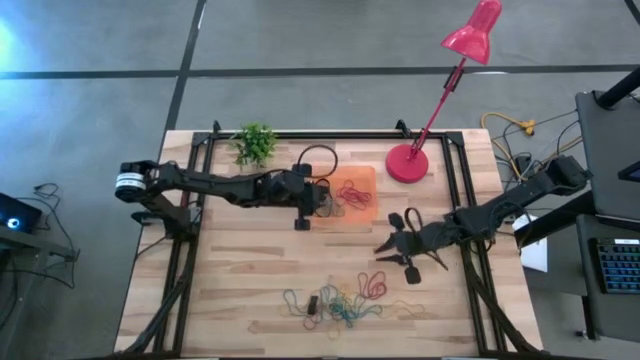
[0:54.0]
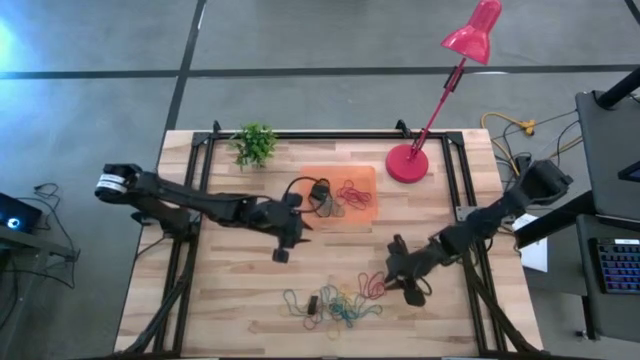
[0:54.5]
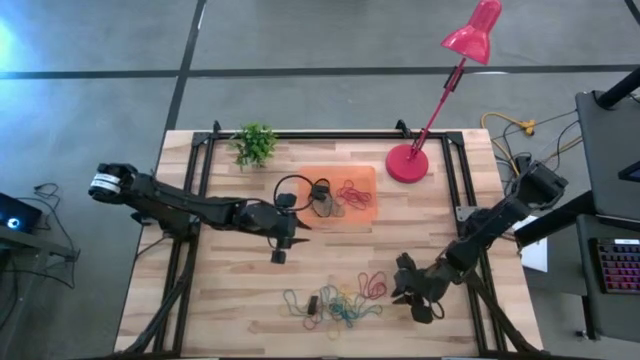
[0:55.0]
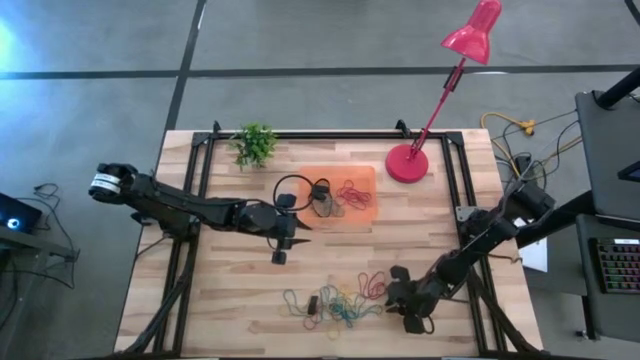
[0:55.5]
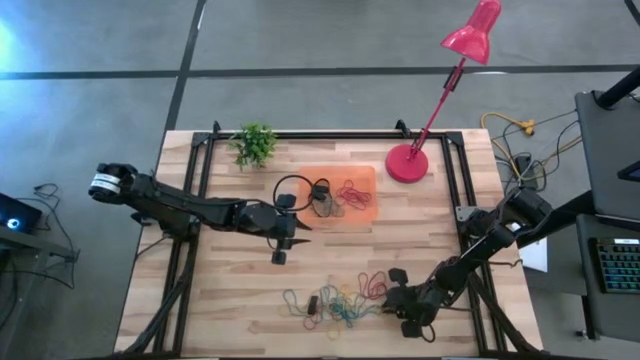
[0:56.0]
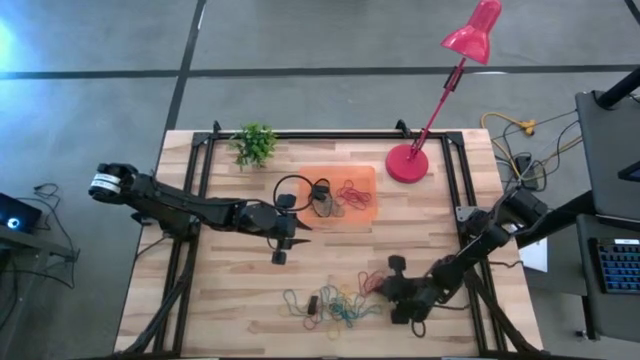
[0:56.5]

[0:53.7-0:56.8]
Task: Pick and place rubber bands into bin
Put the right red rubber band into the bin

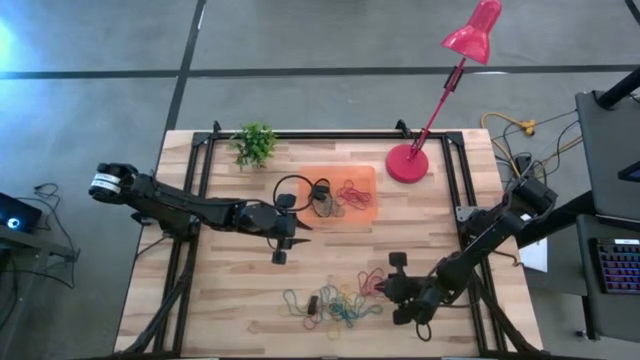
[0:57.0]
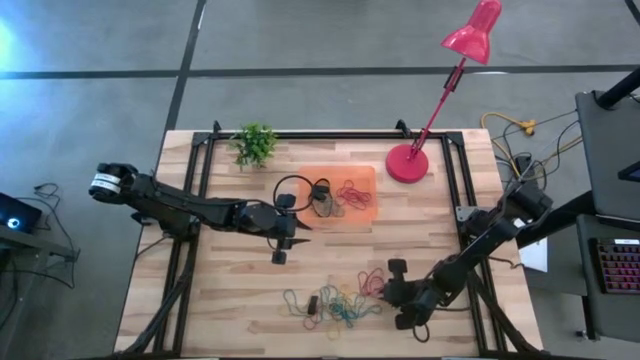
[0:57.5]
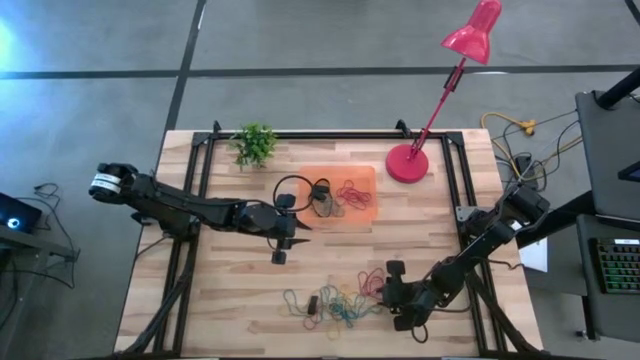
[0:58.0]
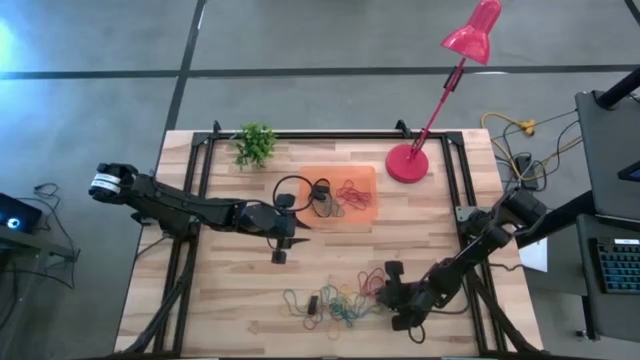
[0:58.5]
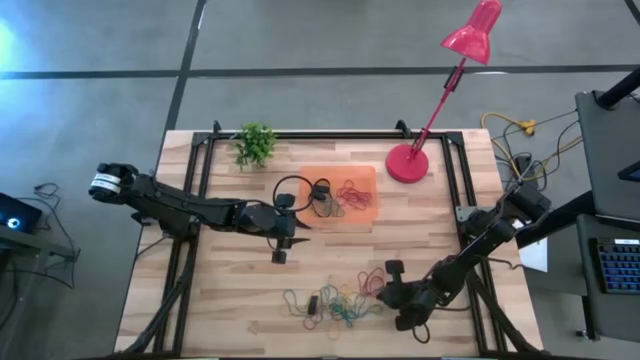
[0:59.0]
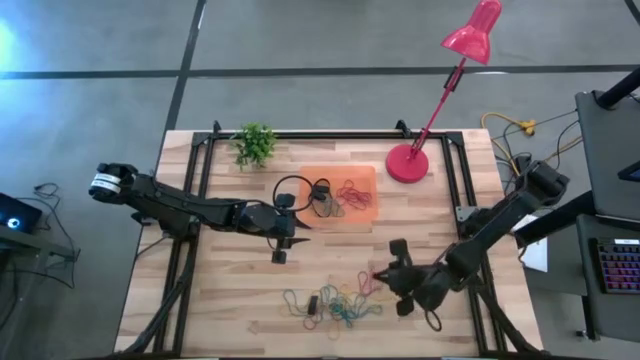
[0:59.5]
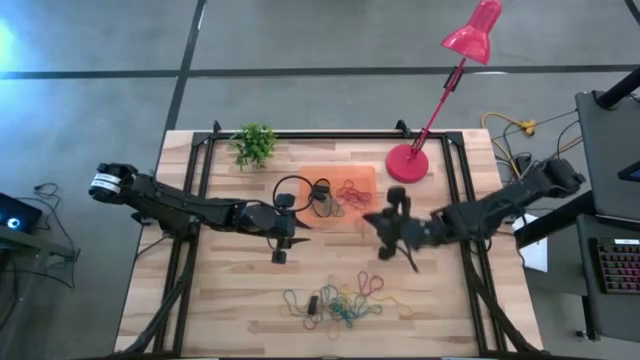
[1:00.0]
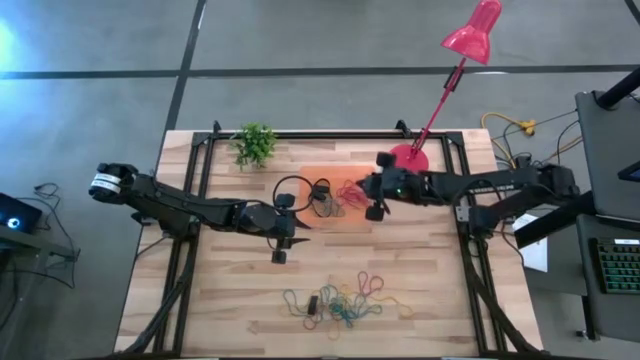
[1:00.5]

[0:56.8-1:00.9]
Put the right red rubber band into the bin

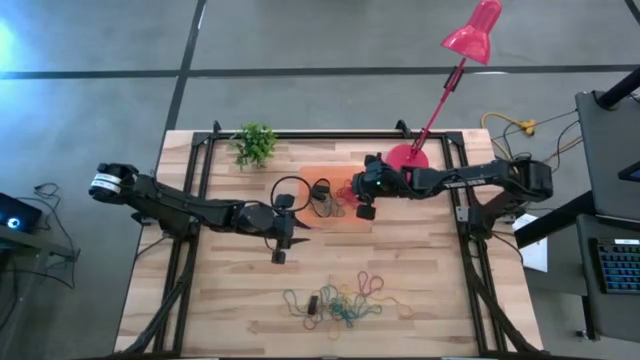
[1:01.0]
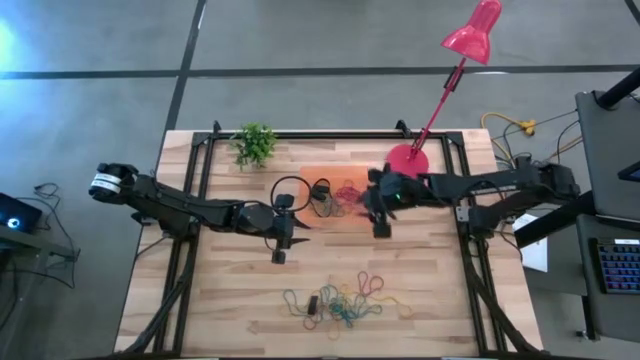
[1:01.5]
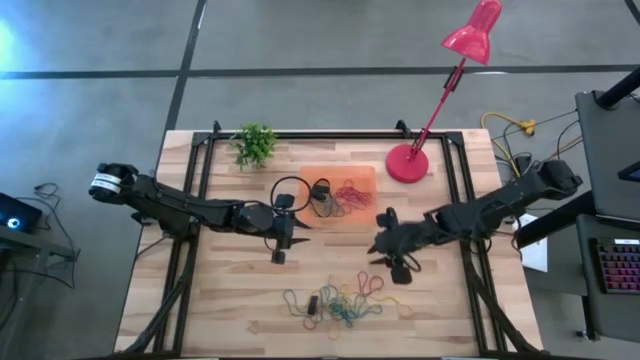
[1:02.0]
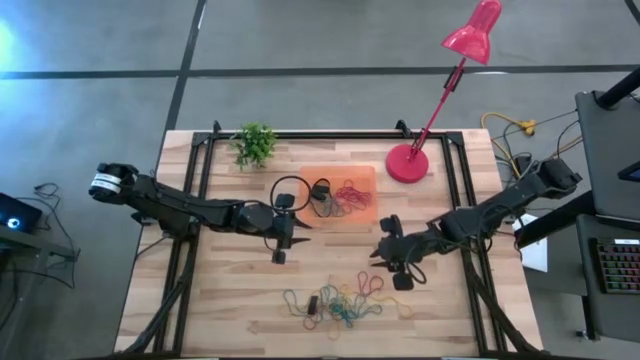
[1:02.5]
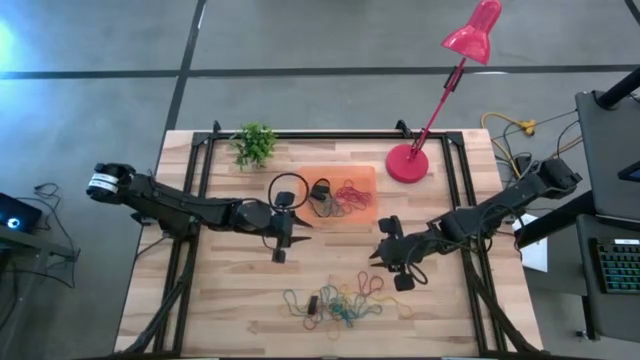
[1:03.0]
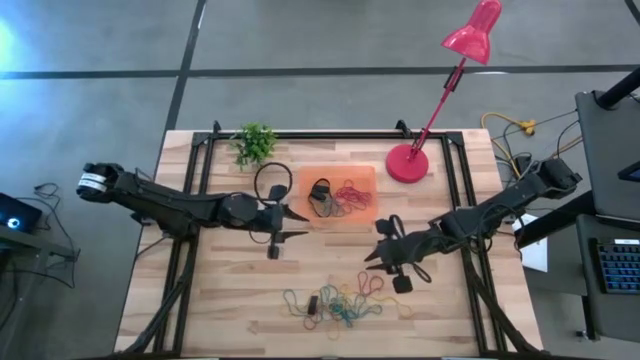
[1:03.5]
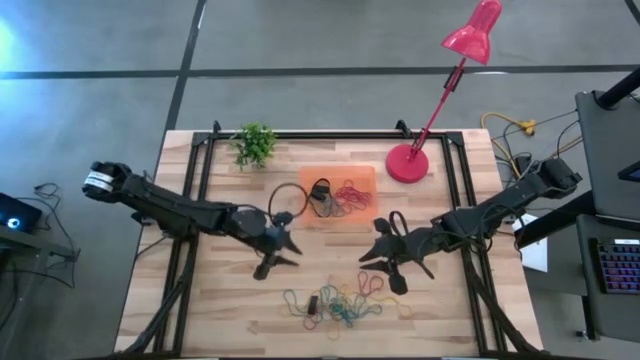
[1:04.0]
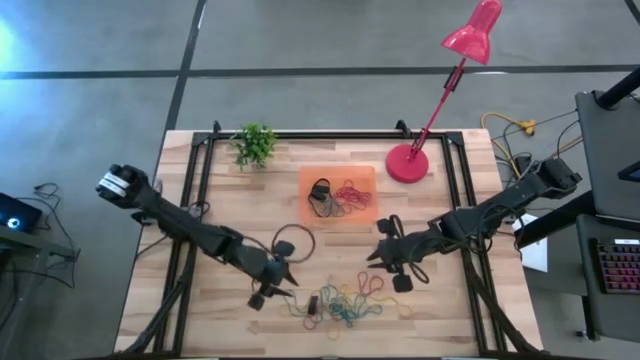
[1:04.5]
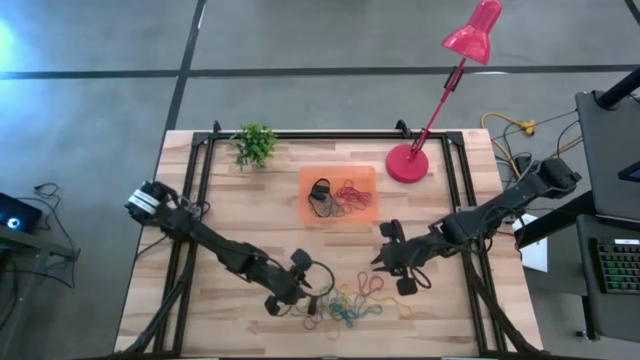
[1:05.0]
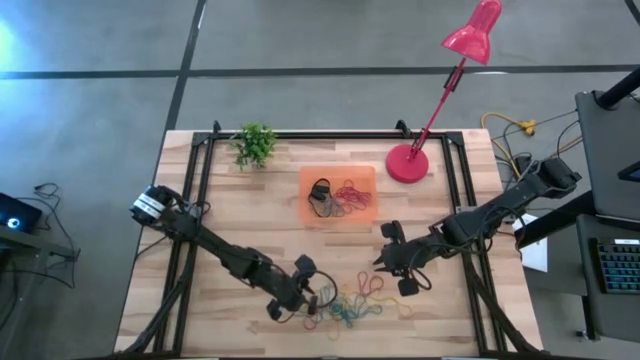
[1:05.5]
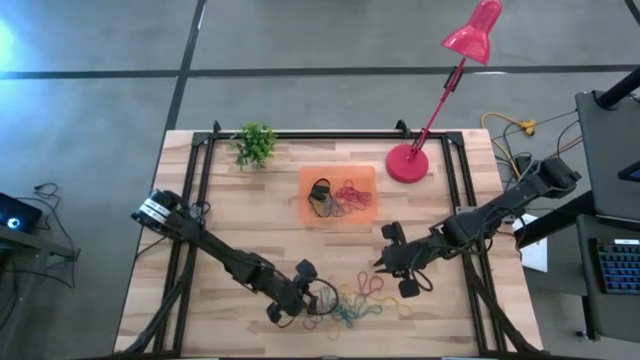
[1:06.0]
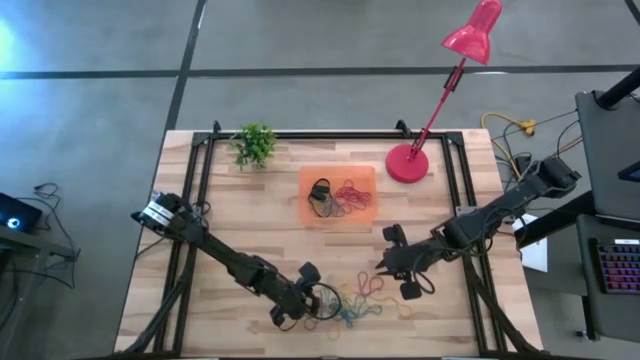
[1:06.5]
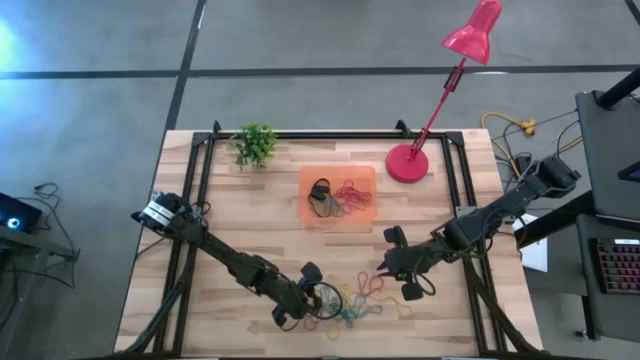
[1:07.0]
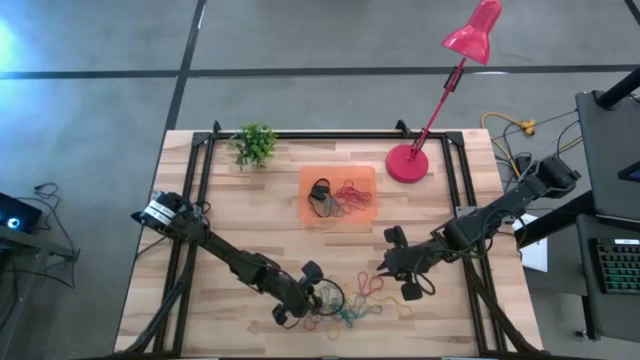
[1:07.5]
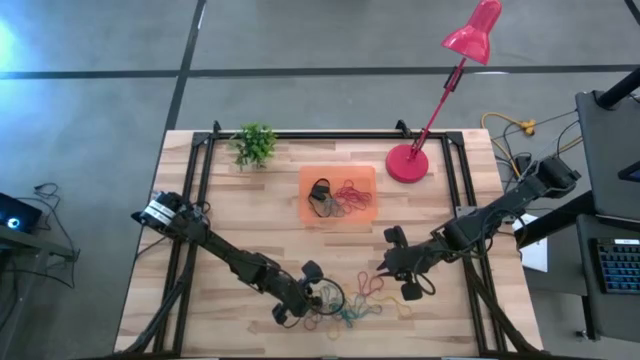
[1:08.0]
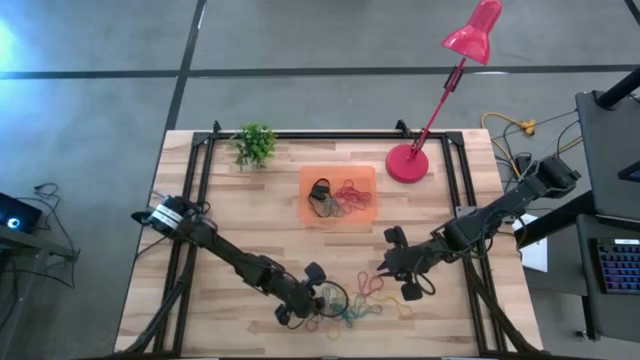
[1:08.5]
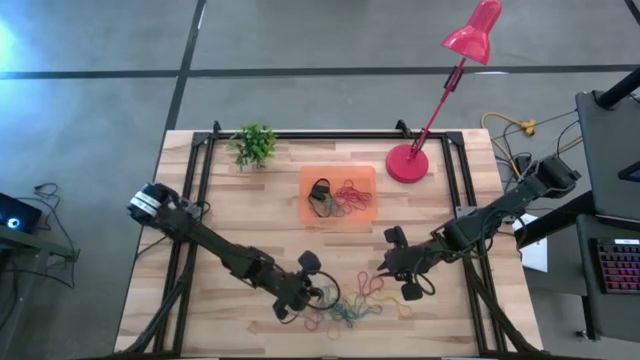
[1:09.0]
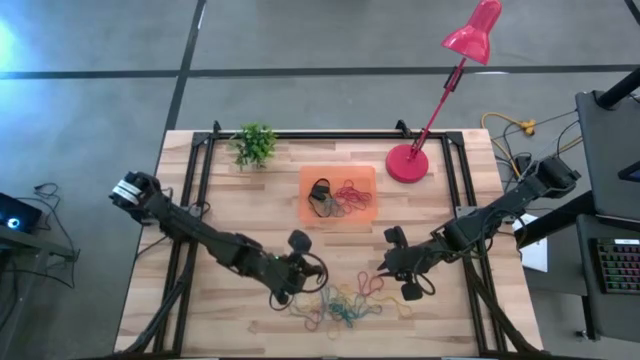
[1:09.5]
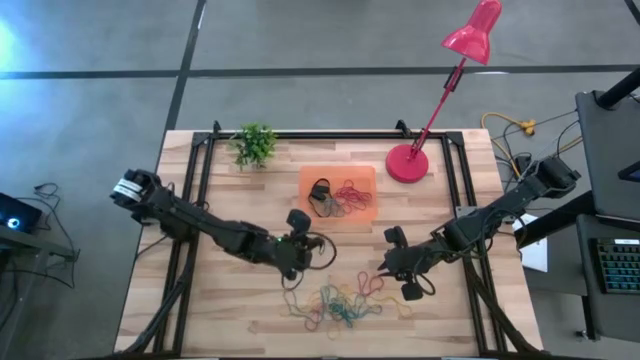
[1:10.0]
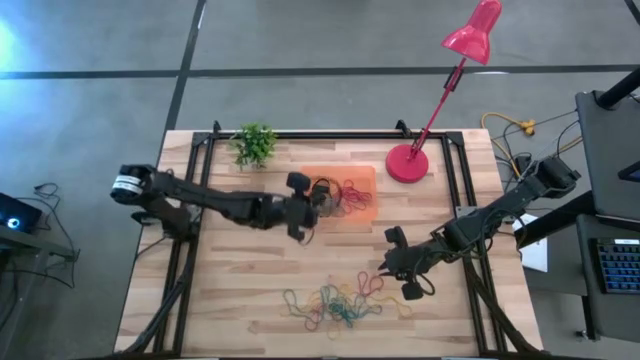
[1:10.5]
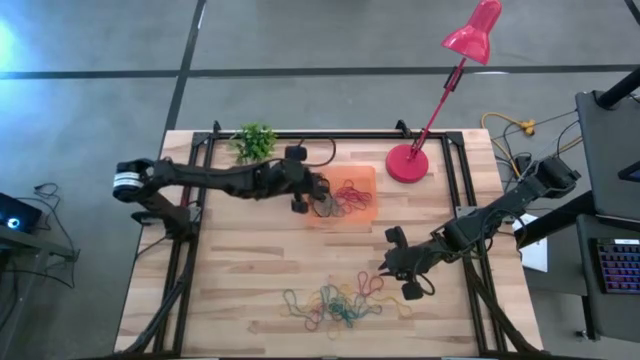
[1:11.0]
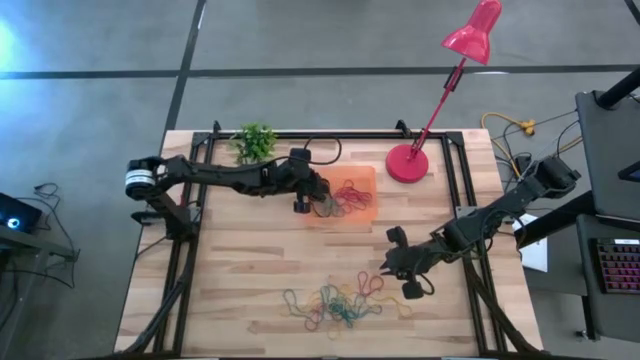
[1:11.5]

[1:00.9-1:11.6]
Put the black rubber band into the bin

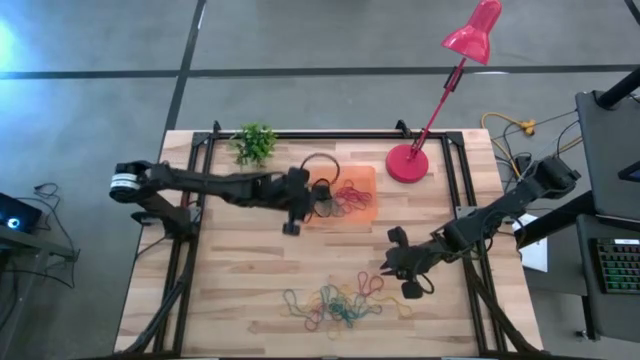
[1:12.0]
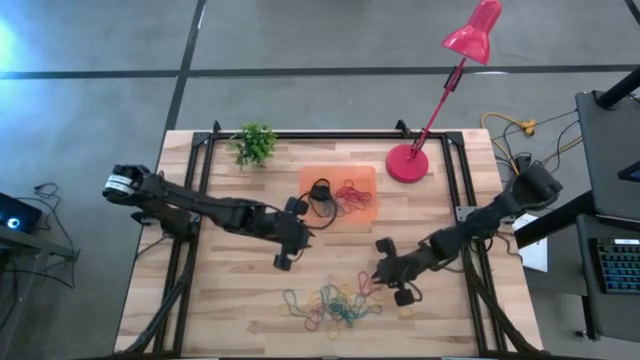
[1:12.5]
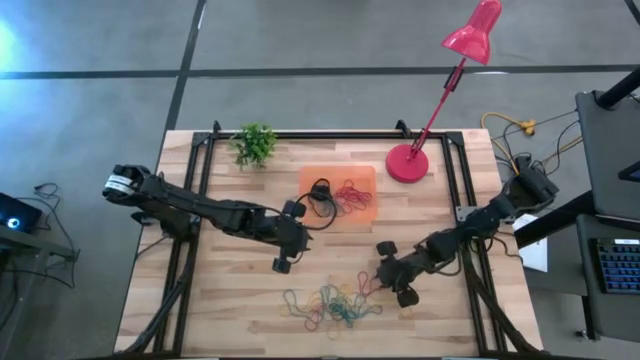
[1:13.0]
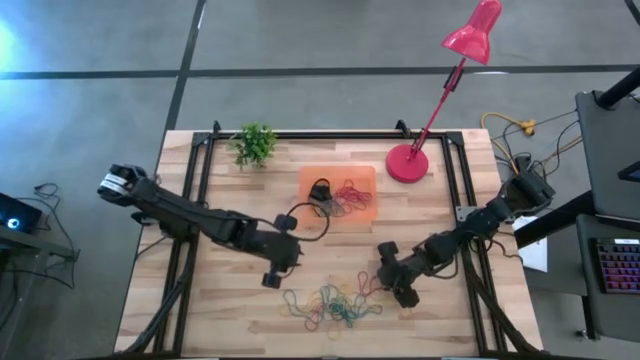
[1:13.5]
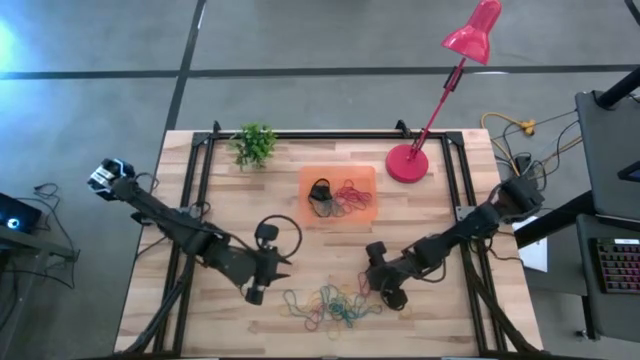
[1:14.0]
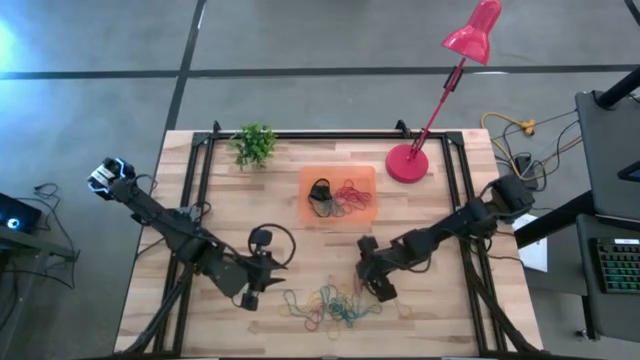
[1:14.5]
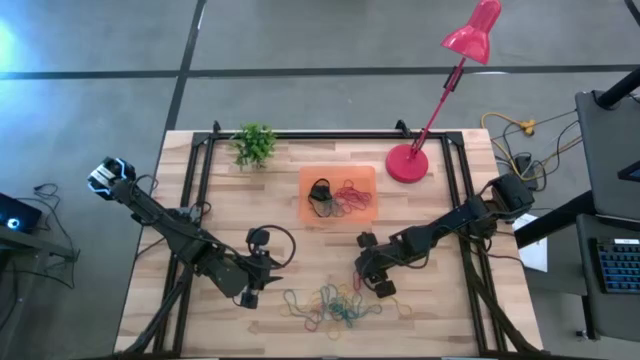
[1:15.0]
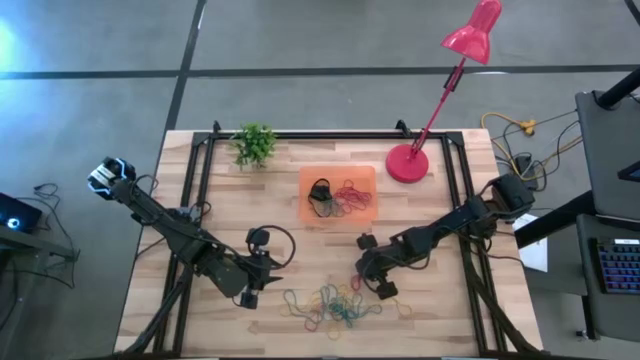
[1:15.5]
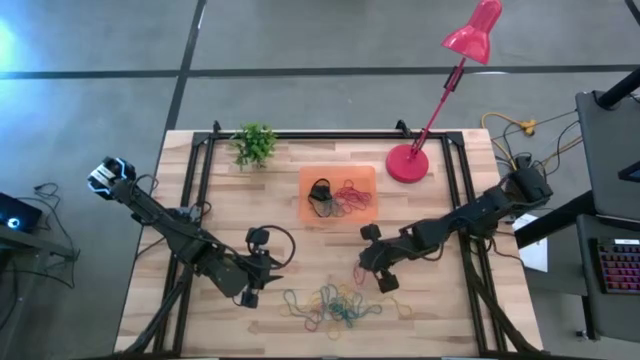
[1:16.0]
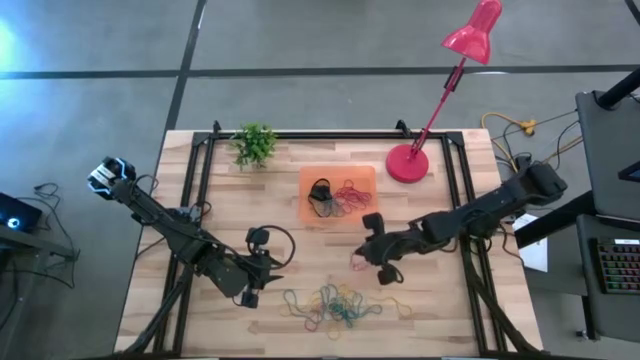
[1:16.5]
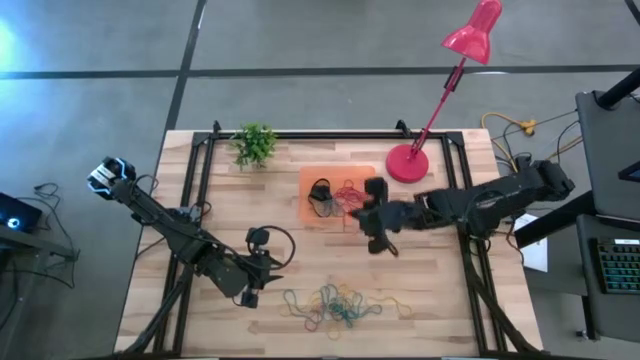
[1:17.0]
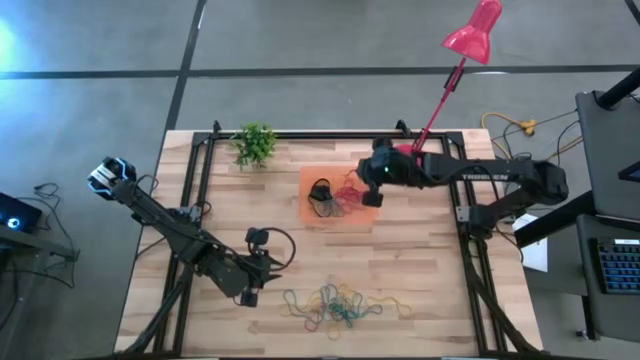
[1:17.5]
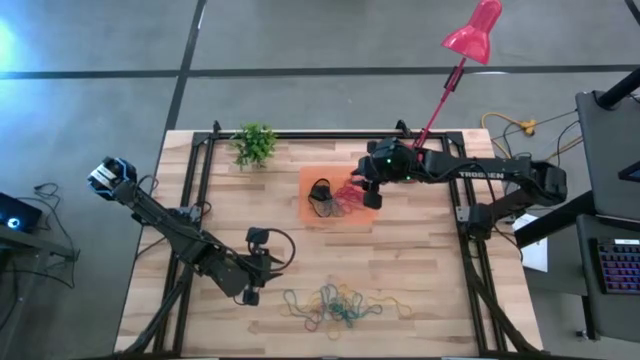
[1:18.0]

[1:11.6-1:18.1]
Put the right red rubber band into the bin
